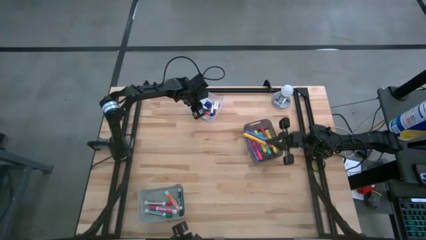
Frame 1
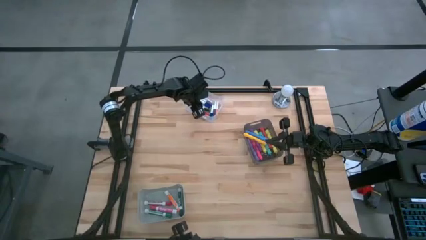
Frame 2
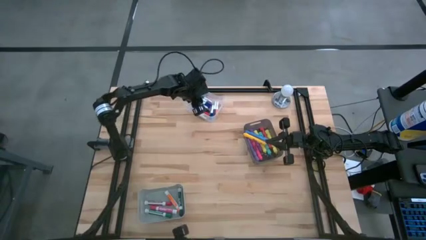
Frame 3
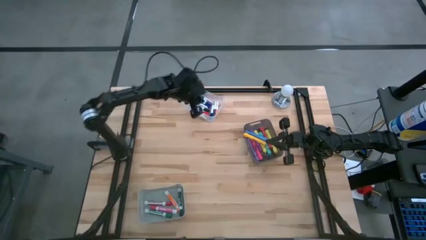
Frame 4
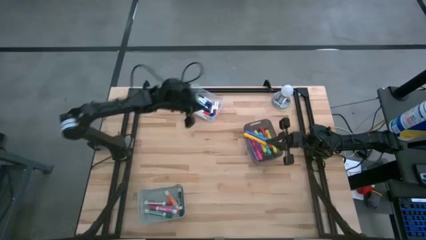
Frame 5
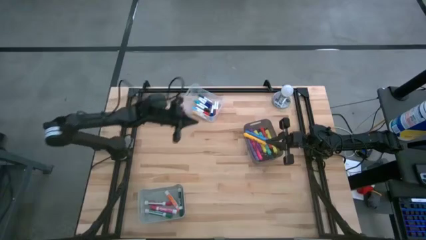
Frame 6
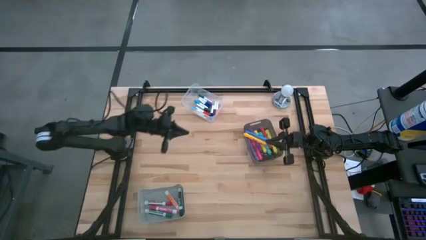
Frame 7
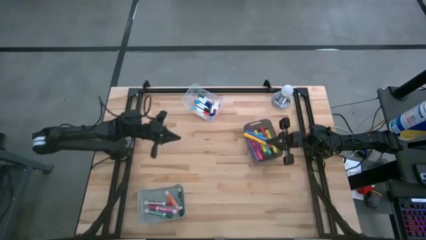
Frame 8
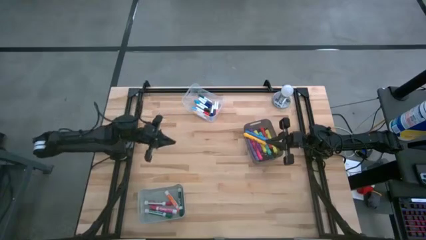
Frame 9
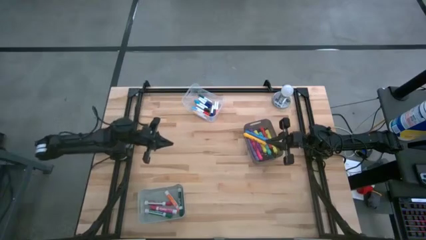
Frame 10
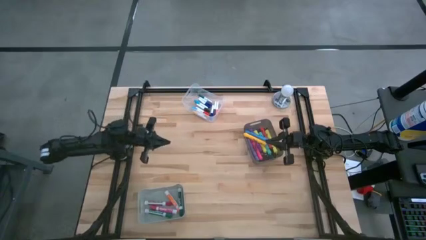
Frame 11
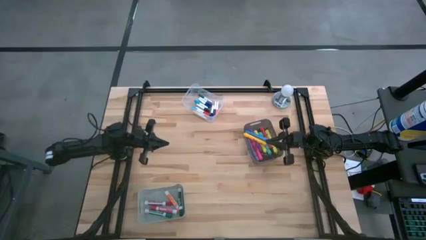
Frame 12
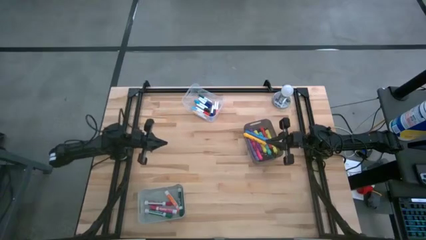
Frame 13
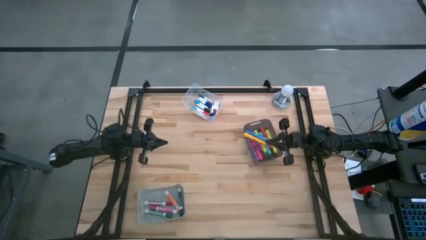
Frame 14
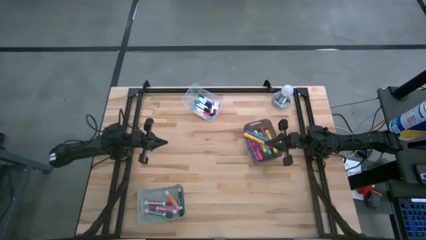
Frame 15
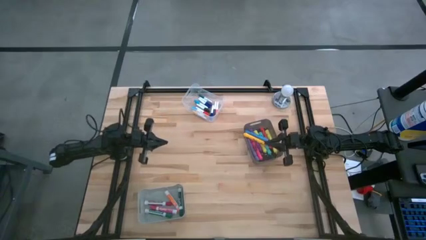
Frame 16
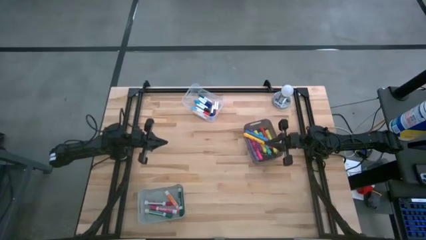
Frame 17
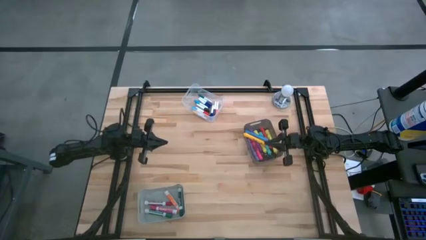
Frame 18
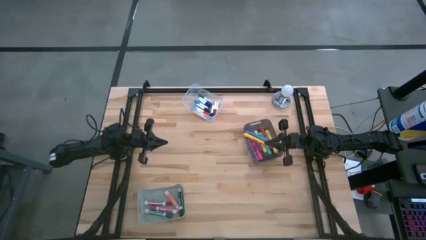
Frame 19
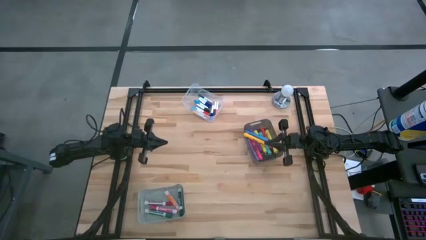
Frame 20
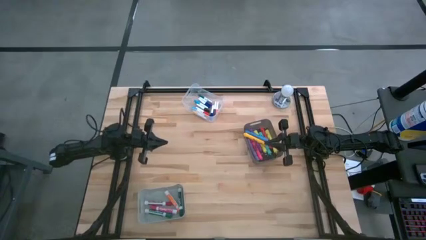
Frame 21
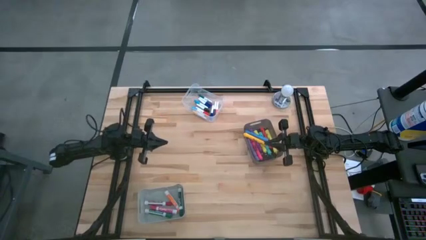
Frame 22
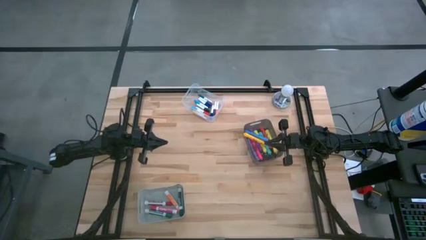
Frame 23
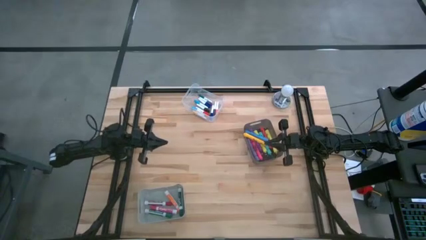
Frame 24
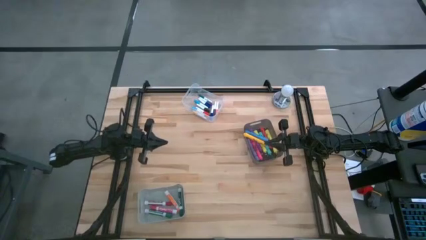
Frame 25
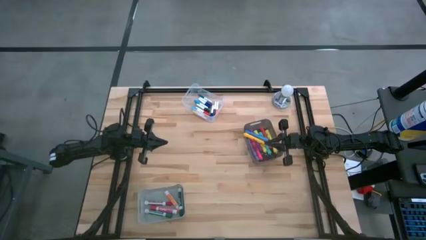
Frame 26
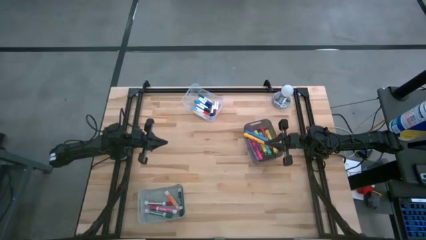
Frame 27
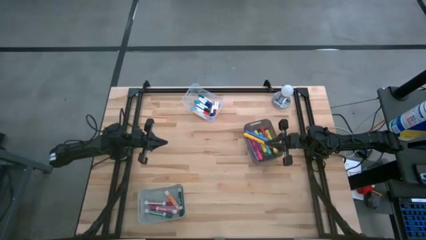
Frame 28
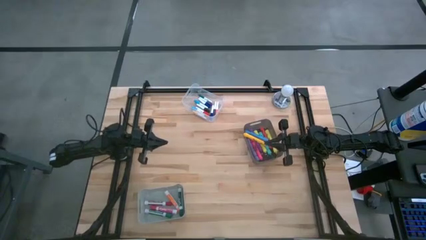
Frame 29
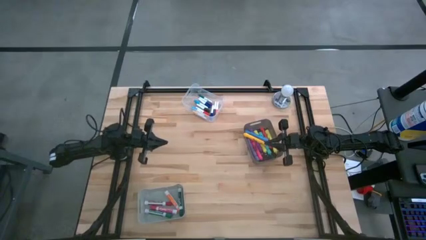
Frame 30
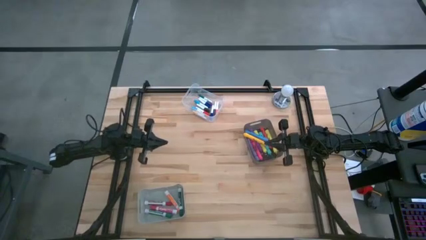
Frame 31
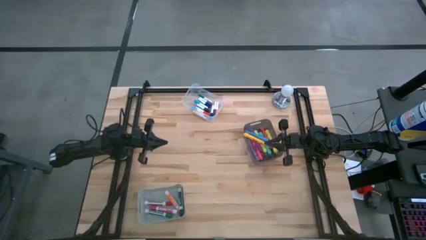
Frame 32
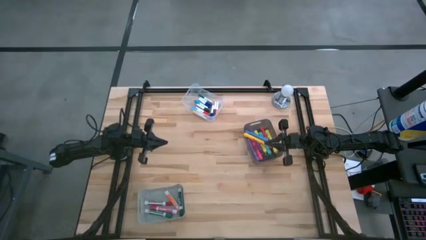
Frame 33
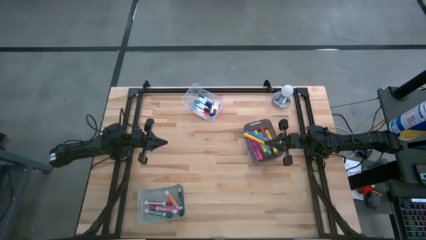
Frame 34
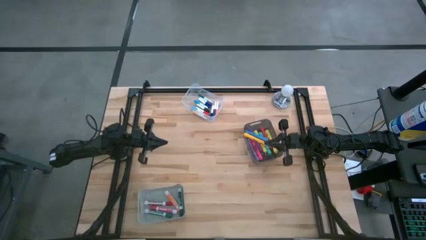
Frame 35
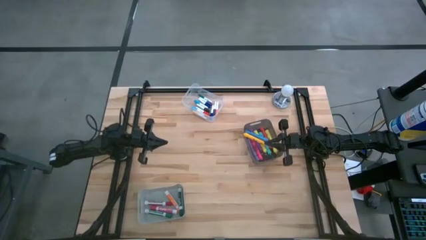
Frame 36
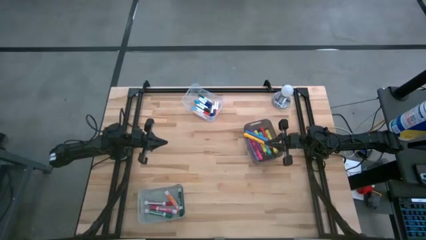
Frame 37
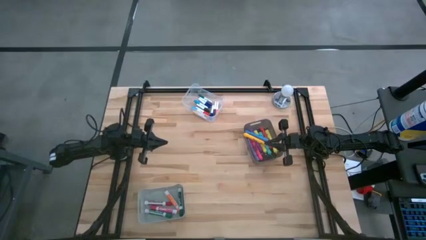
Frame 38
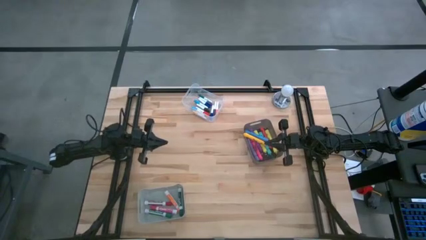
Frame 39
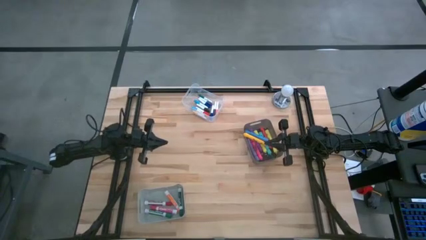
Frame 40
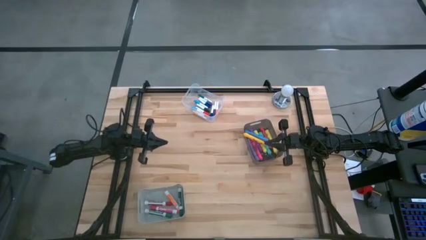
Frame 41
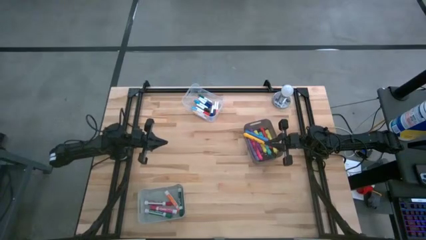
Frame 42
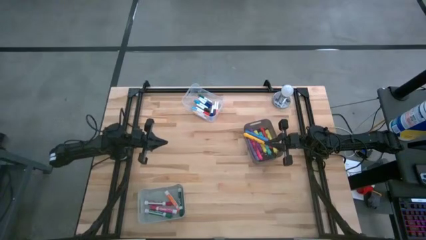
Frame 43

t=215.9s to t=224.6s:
Task: Pick & Place Markers
Return to Home Position

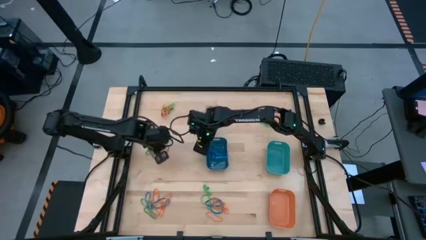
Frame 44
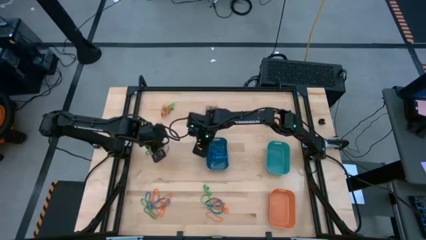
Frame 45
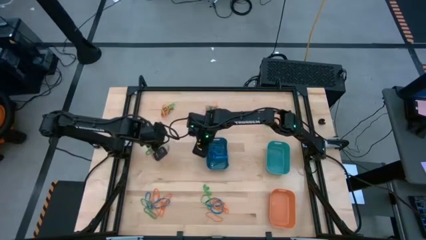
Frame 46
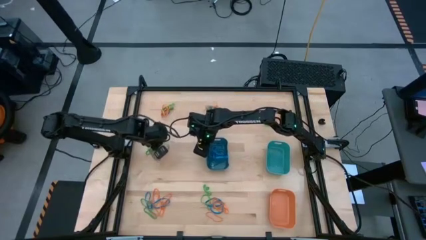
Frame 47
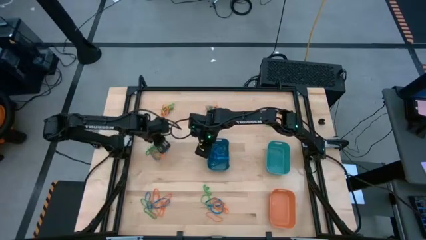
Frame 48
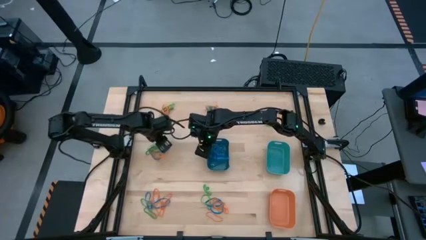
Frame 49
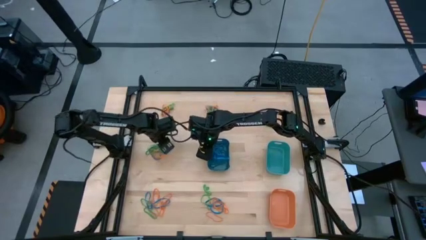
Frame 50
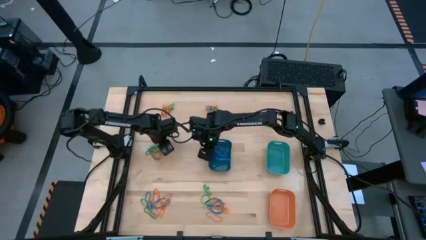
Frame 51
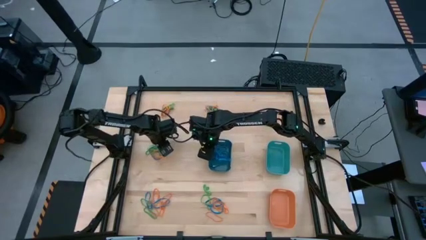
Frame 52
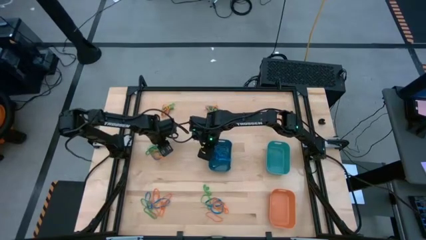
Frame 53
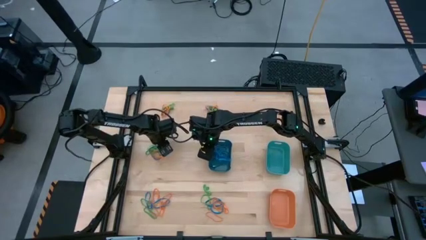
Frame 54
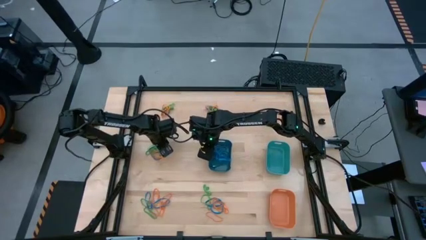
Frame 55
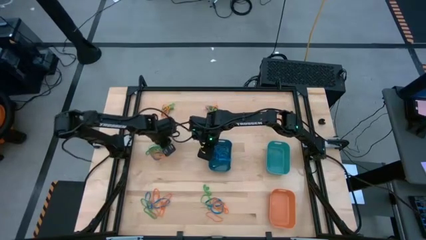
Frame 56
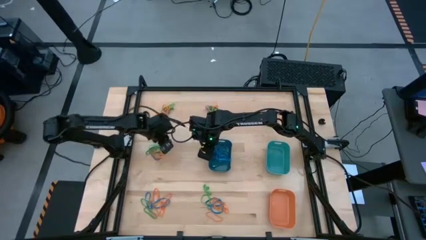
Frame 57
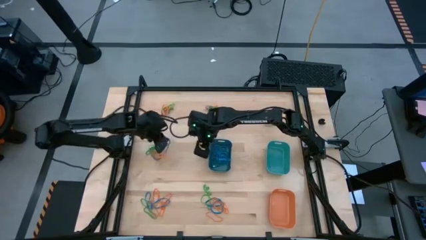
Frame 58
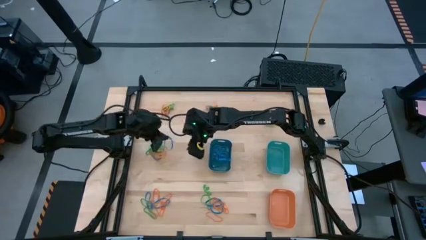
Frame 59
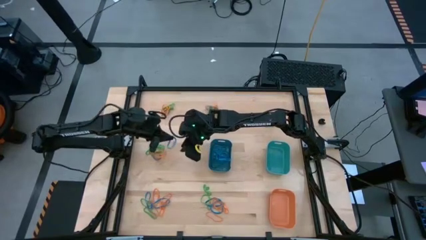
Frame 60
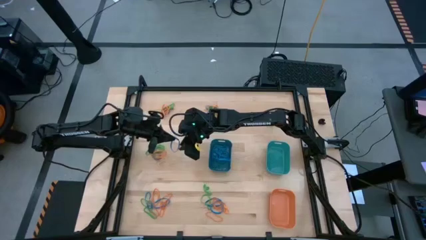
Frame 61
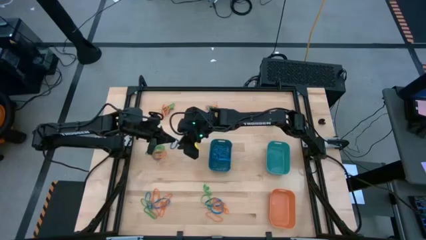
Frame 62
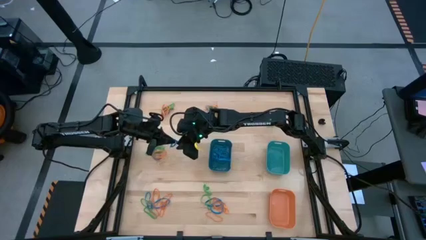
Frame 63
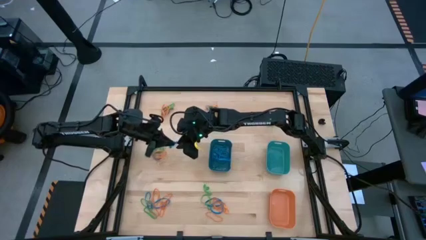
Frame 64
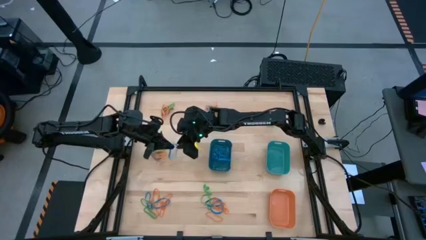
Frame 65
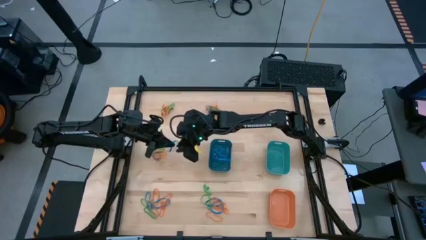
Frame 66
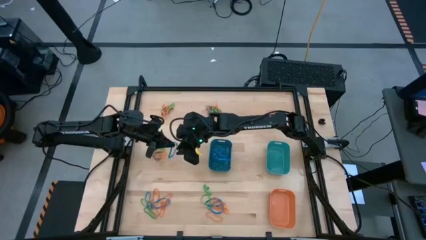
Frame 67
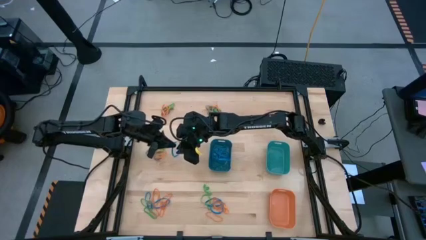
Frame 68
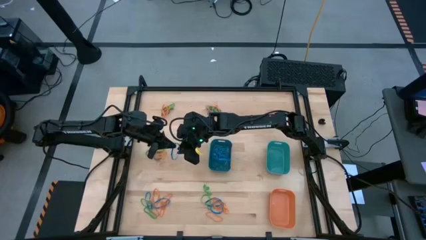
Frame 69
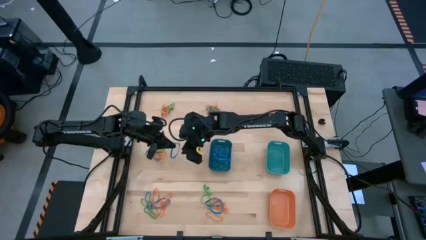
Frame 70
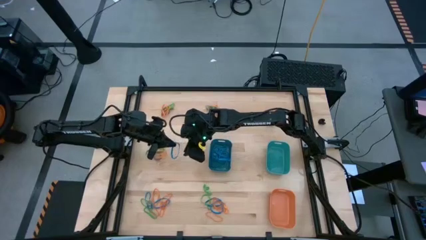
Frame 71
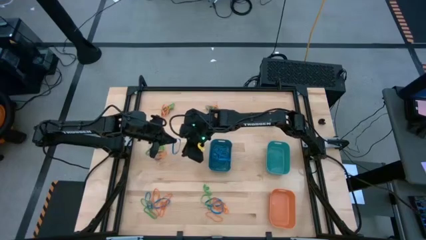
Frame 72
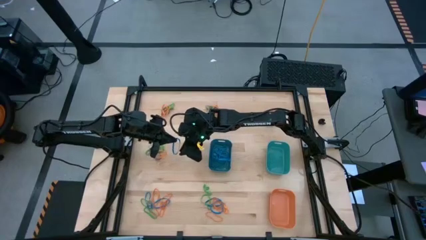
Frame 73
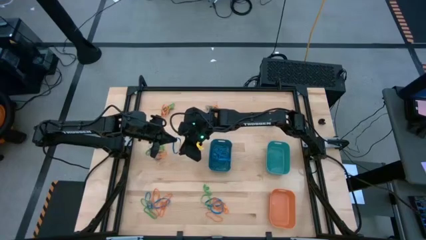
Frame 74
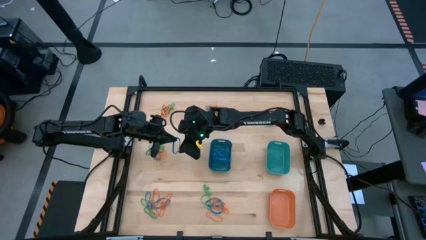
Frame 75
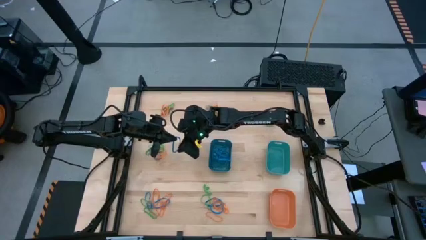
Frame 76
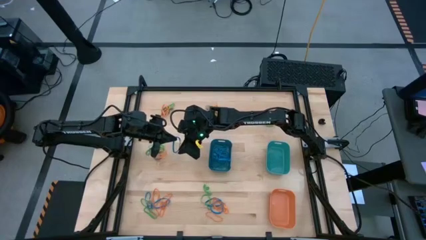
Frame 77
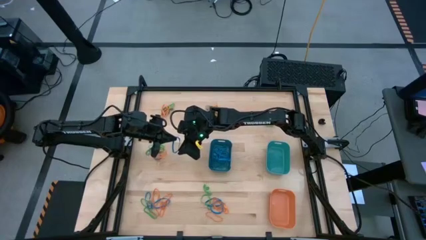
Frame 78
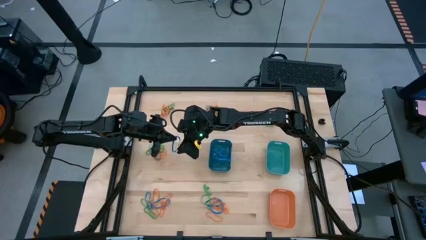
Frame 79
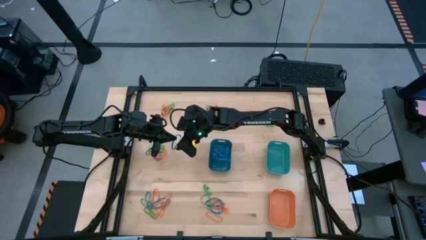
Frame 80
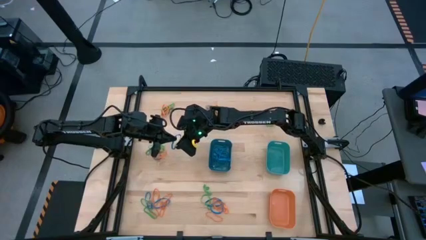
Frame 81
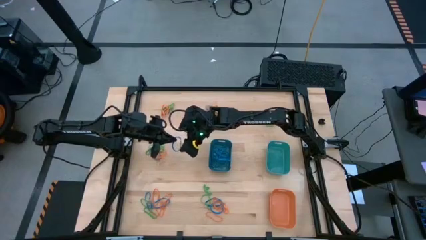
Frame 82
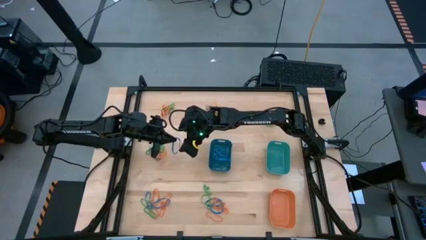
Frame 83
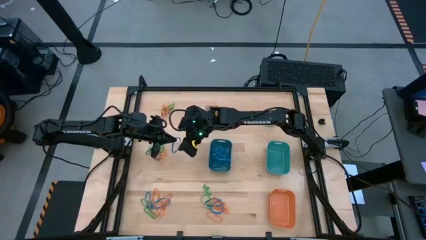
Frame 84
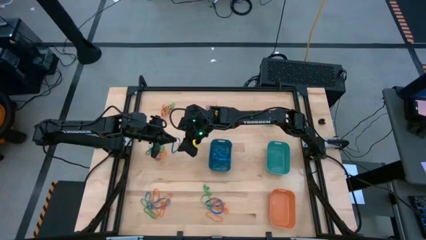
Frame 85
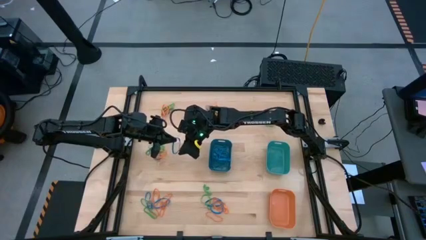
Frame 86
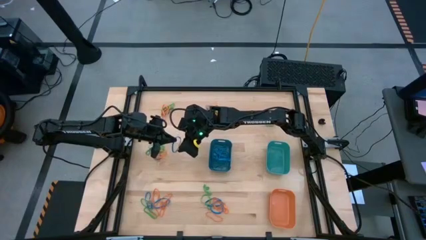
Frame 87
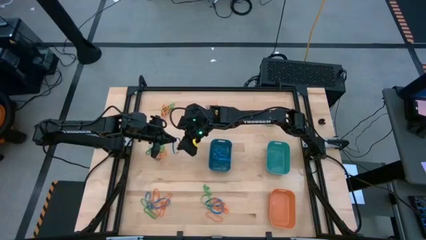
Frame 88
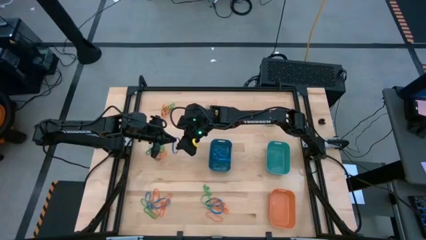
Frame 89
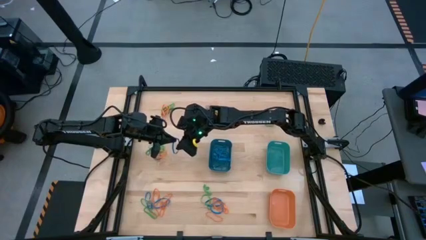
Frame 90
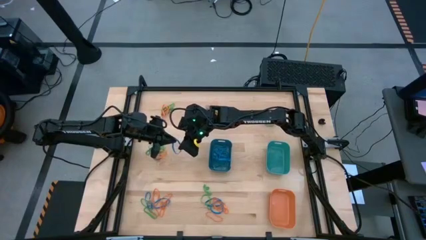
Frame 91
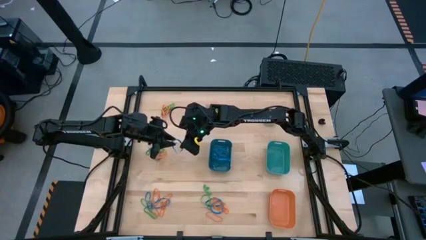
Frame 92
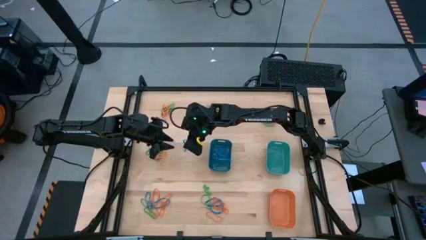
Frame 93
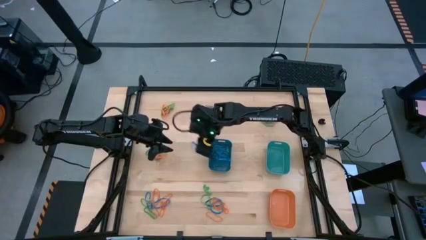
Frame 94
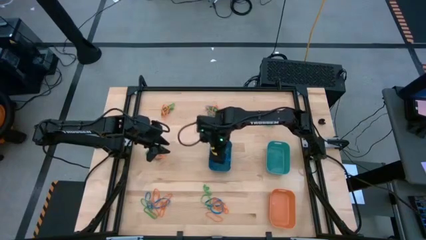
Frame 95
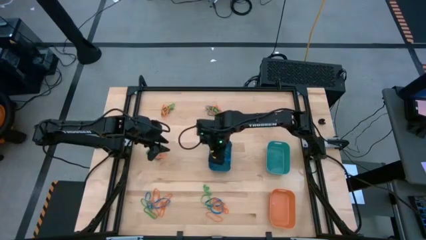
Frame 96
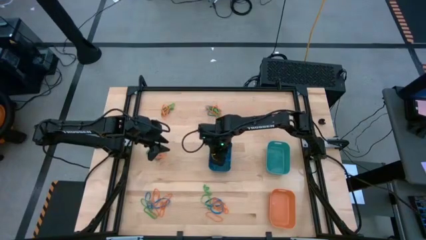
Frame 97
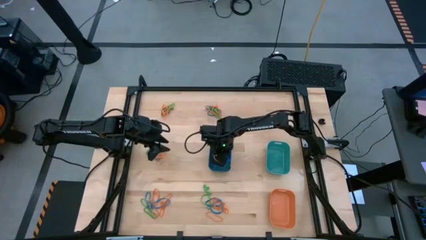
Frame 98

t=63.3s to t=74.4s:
Task: Sort rubber bands into baskets
Put the blue rubberband into the blue bin
